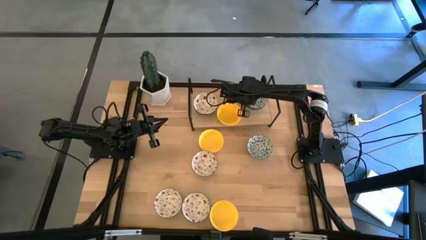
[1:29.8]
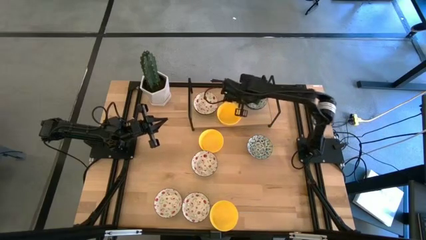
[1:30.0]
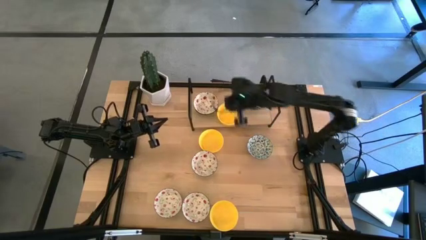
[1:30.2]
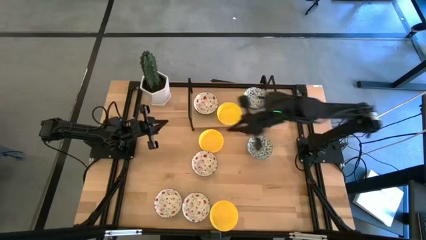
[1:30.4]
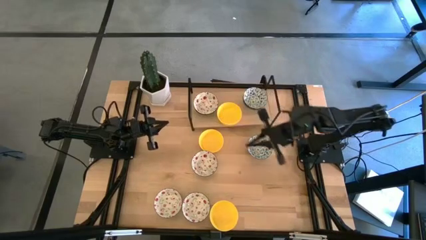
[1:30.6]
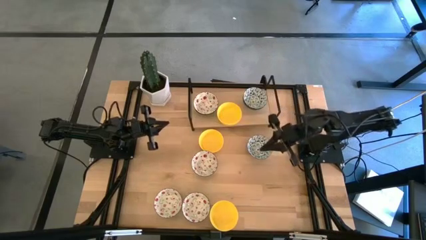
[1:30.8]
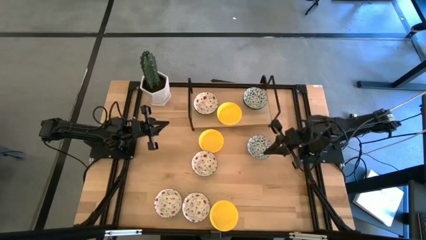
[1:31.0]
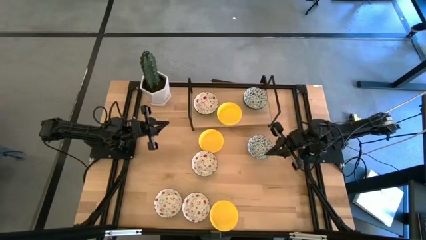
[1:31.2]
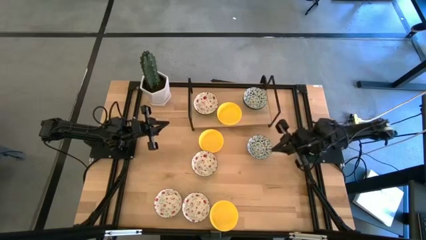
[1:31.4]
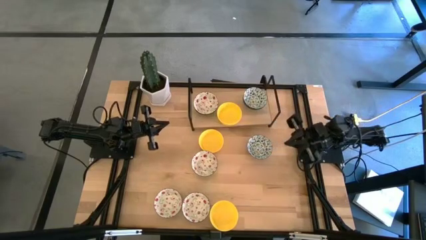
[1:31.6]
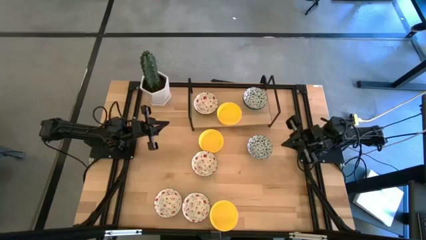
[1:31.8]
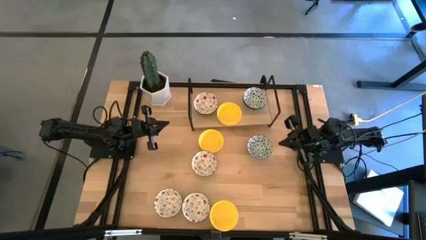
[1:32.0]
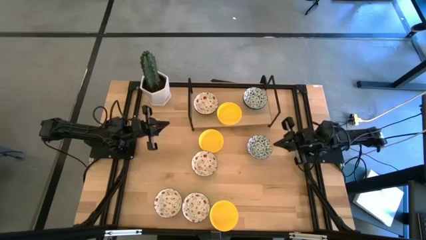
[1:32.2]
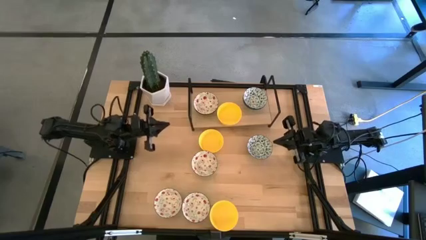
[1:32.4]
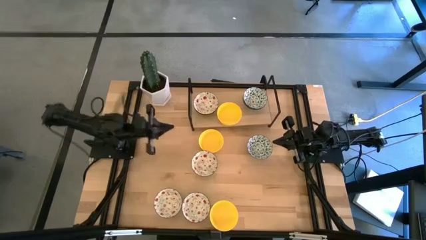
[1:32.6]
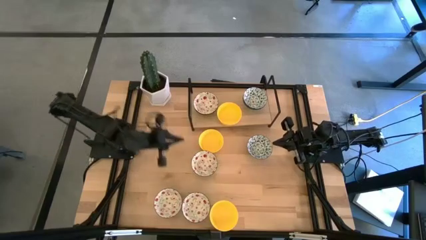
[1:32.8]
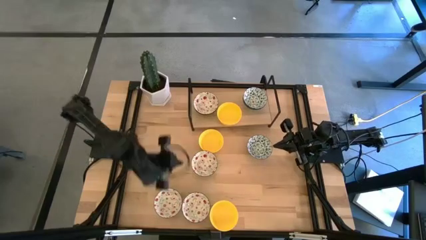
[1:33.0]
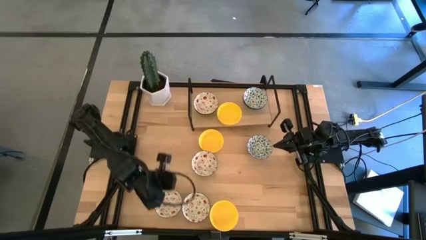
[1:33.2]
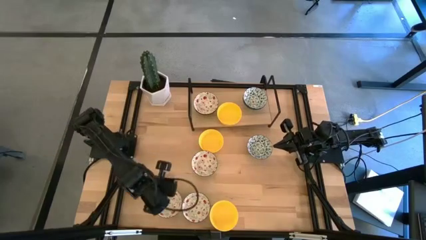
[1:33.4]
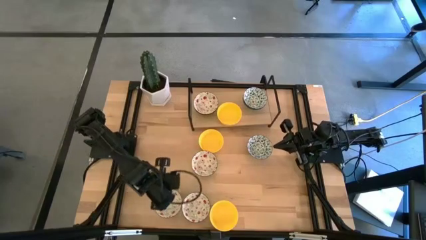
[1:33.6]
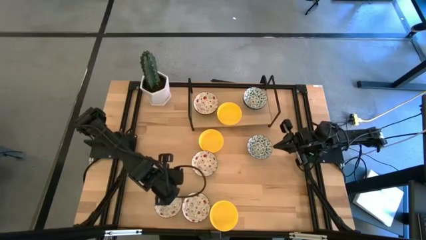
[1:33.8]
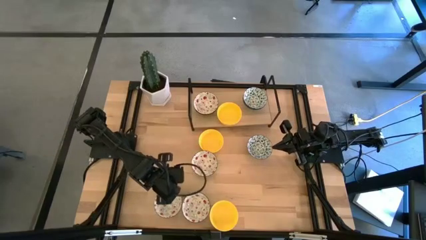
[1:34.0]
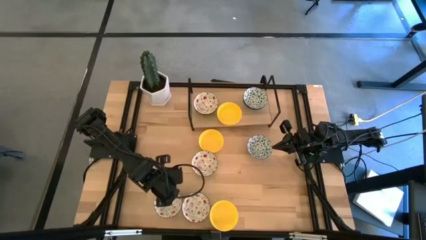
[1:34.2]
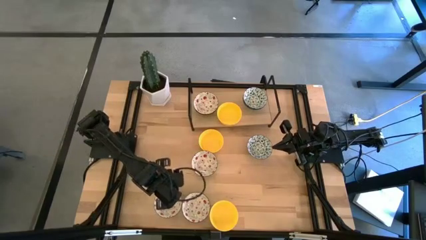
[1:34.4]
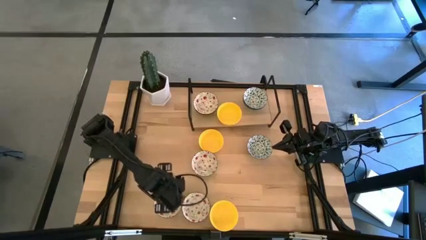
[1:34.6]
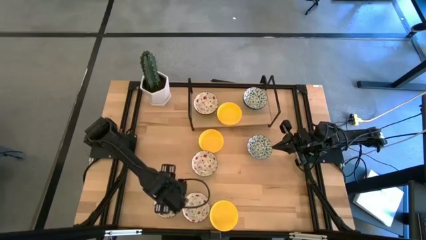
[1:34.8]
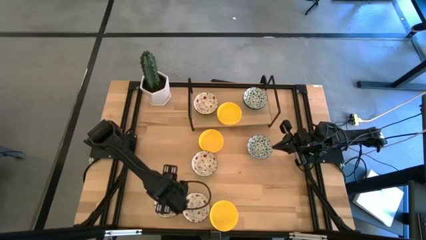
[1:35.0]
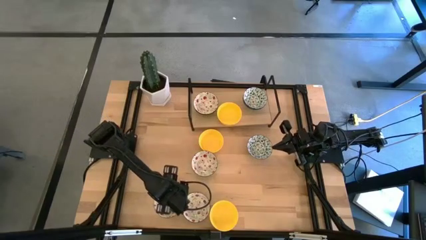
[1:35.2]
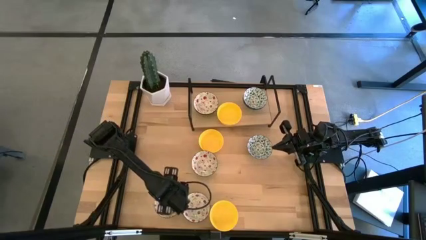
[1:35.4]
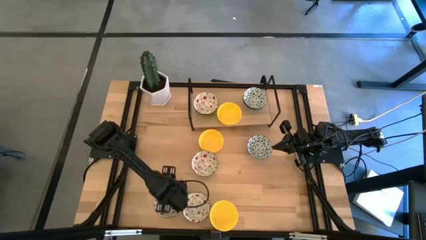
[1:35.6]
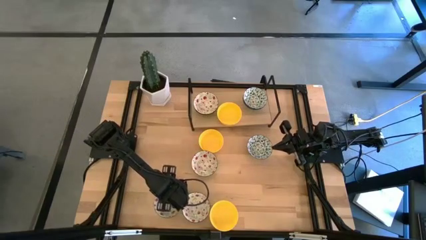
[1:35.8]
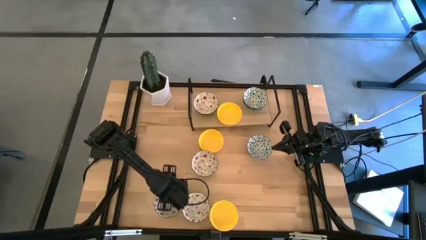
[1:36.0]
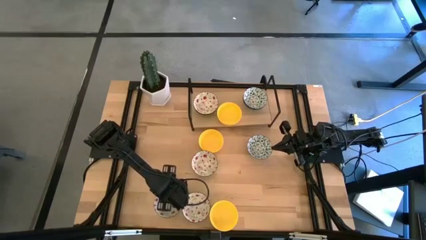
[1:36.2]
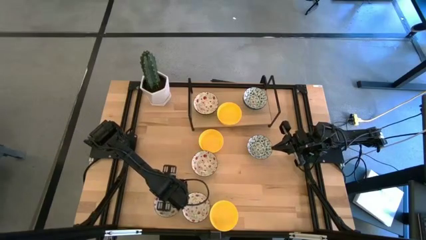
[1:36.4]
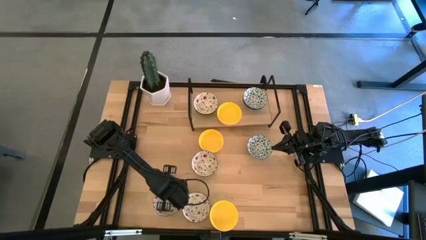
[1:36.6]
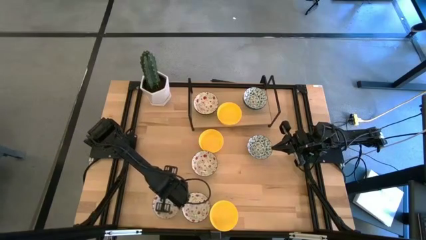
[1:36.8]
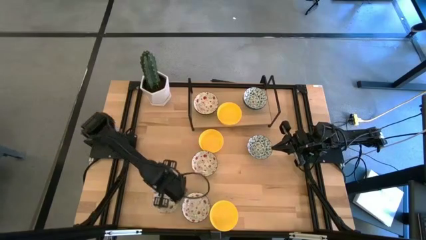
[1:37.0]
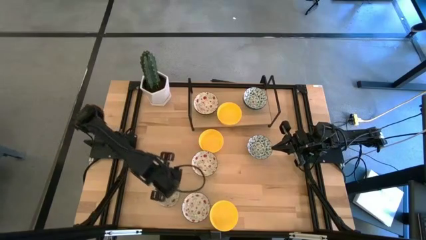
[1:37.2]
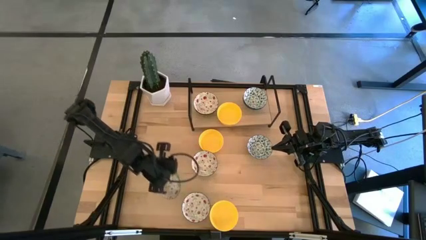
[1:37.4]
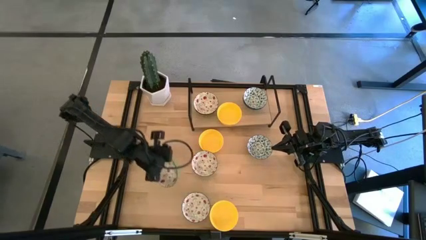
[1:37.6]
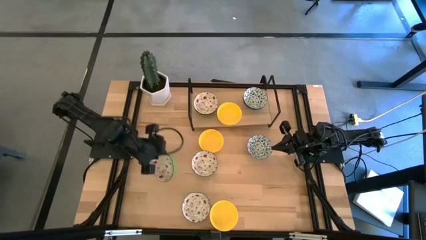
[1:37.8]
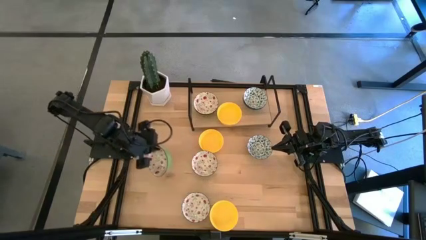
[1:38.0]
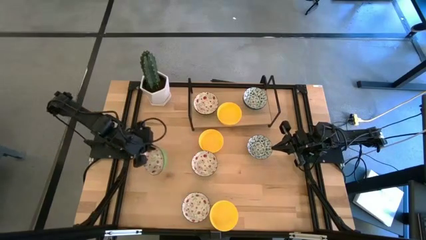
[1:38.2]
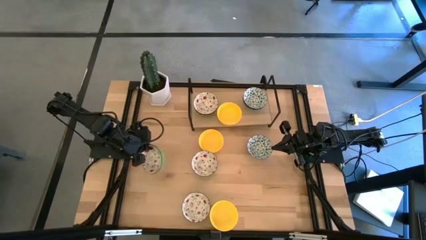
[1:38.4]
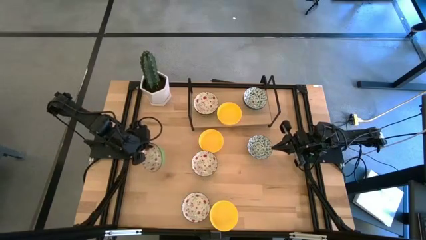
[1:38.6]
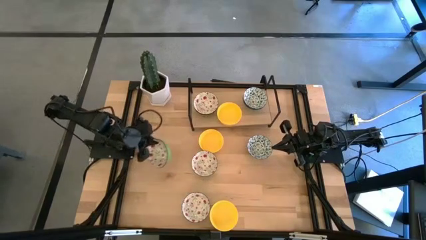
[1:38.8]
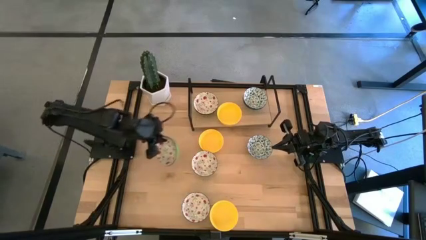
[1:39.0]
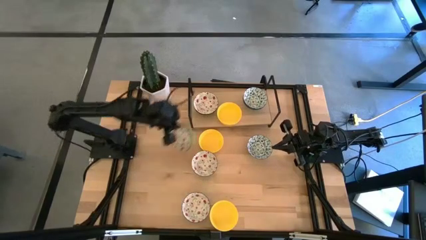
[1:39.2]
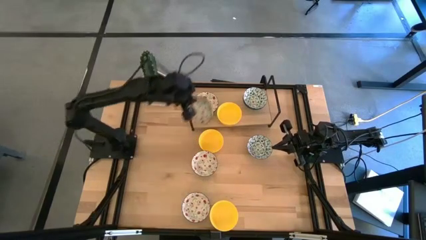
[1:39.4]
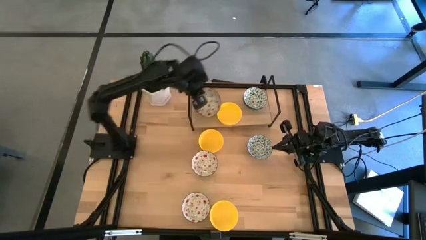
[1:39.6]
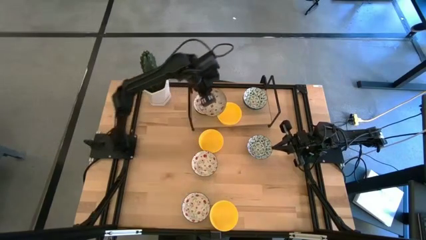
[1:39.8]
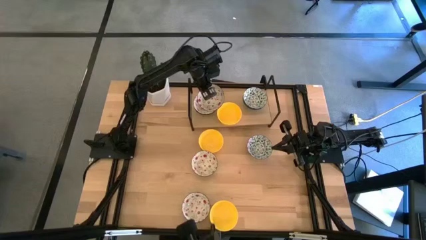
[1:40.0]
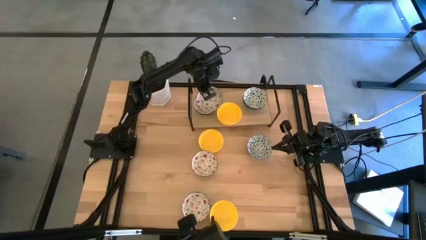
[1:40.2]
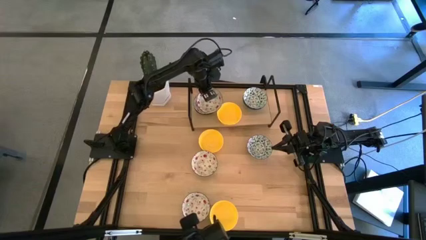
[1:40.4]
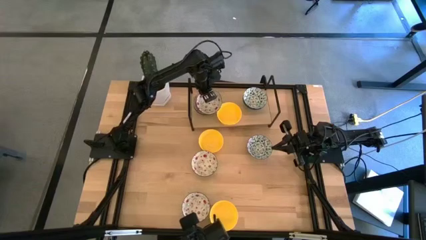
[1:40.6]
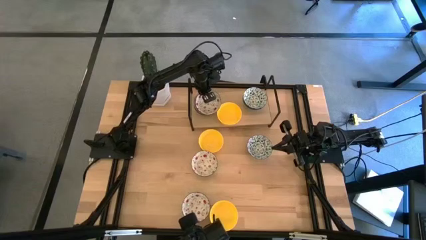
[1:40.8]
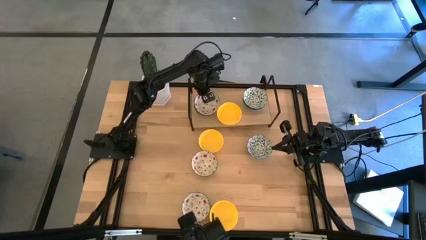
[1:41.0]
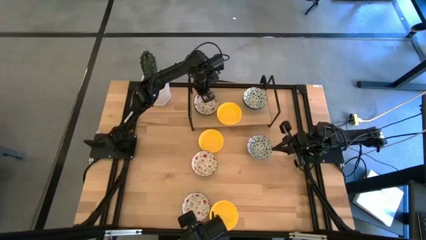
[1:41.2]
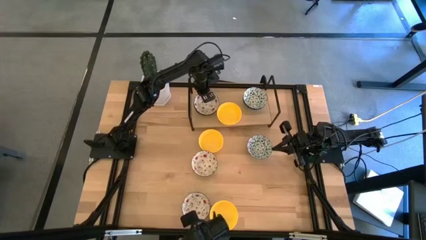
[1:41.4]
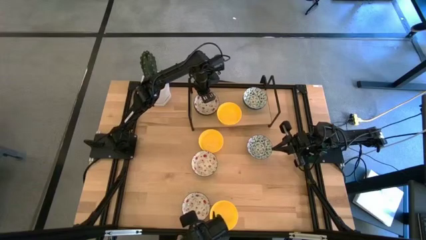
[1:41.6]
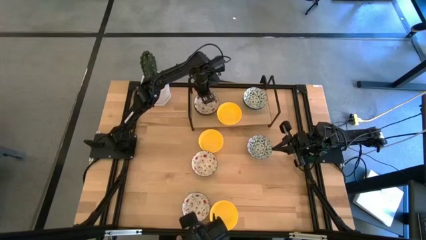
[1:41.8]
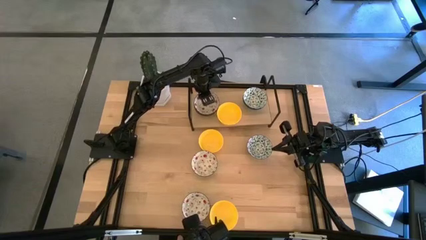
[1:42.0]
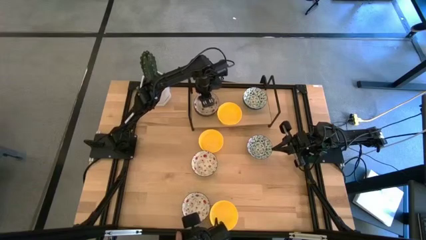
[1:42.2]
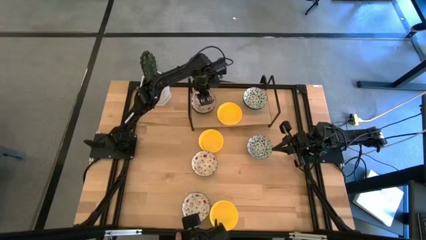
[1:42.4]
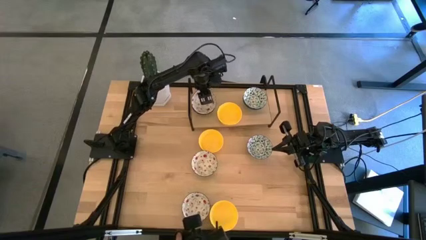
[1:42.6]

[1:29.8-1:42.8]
Task: Pick & Place Mini bowls
Stack the green patterned bowl on the green patterned bowl on the shelf
